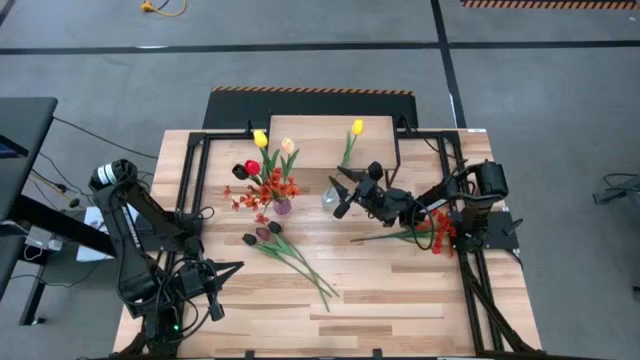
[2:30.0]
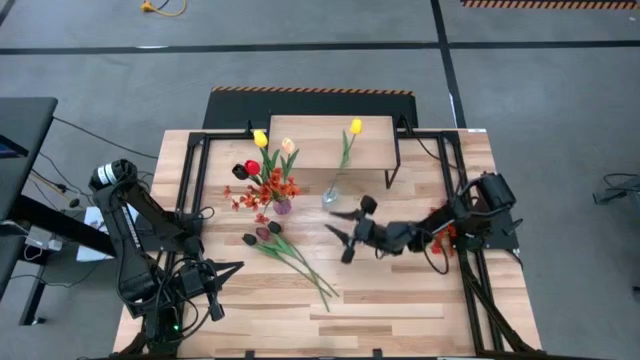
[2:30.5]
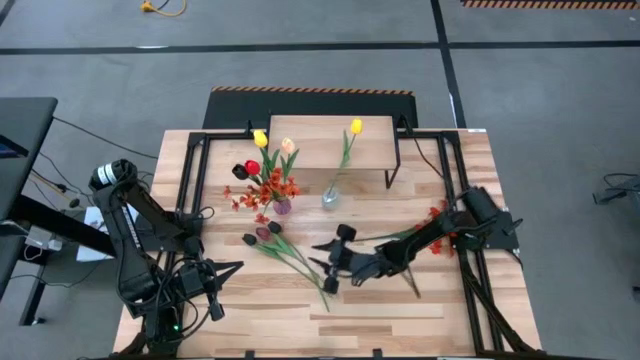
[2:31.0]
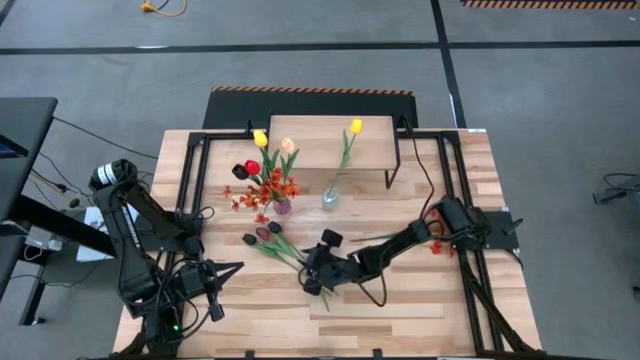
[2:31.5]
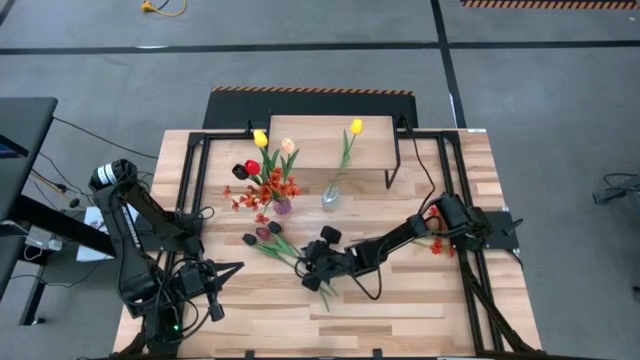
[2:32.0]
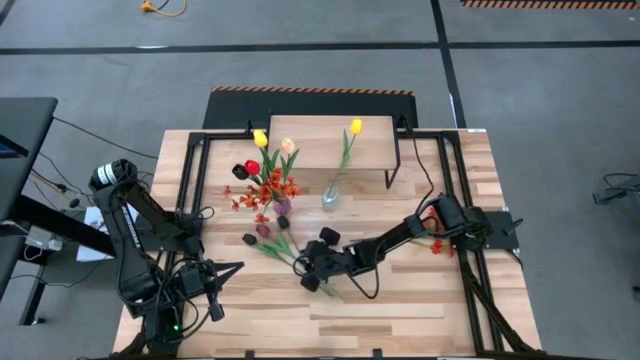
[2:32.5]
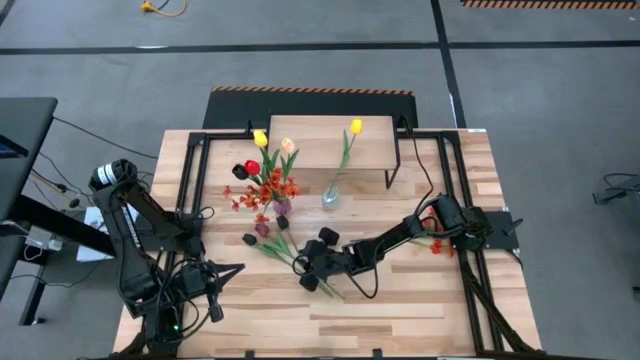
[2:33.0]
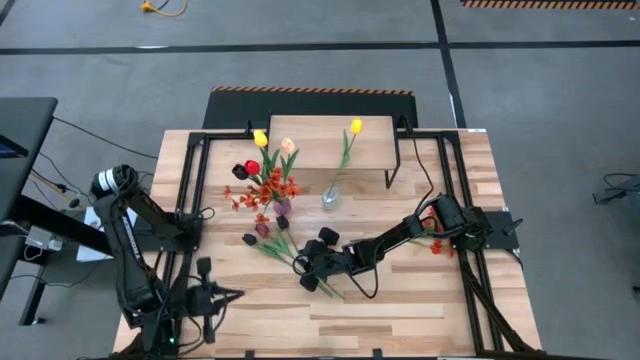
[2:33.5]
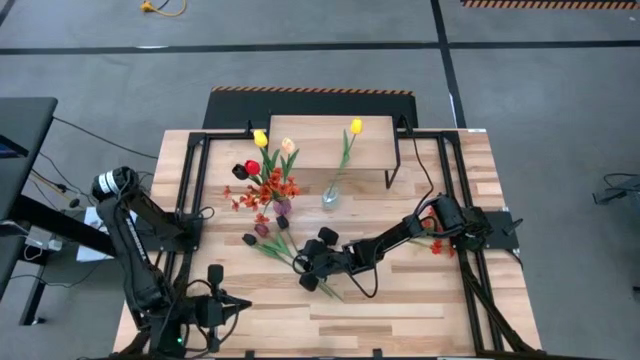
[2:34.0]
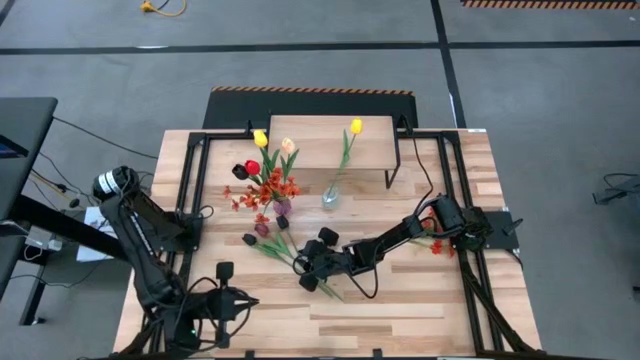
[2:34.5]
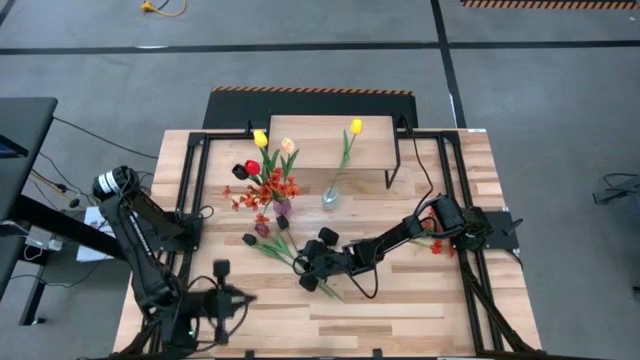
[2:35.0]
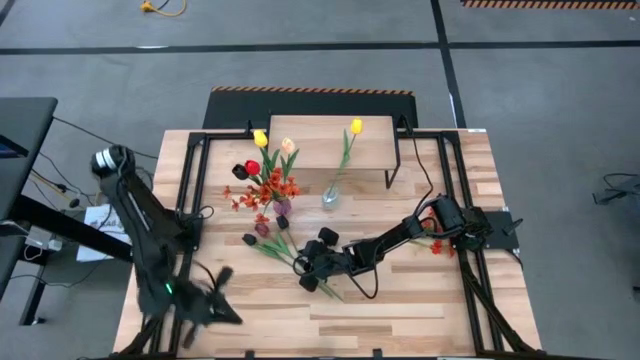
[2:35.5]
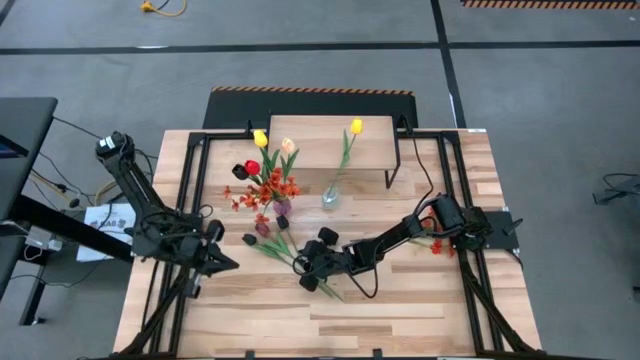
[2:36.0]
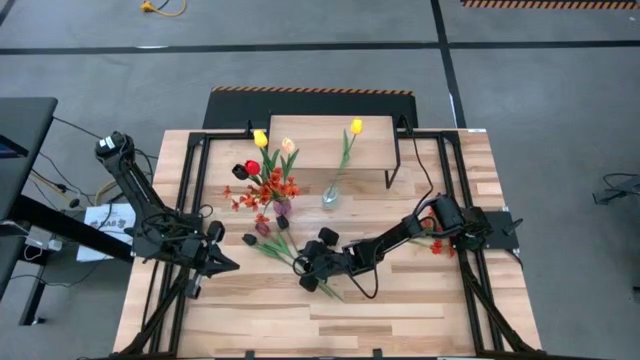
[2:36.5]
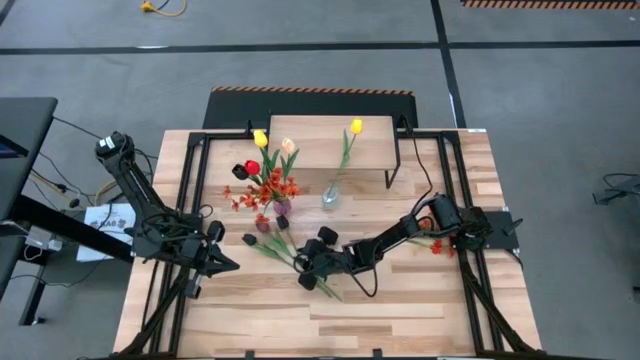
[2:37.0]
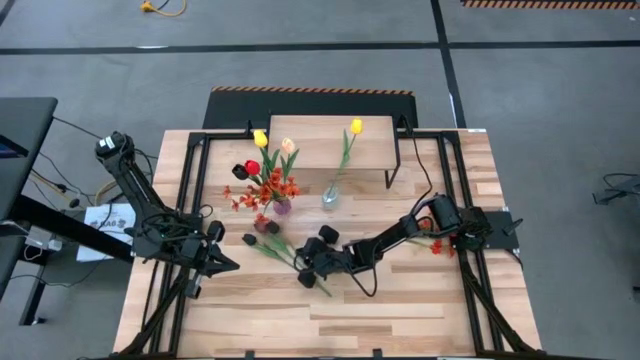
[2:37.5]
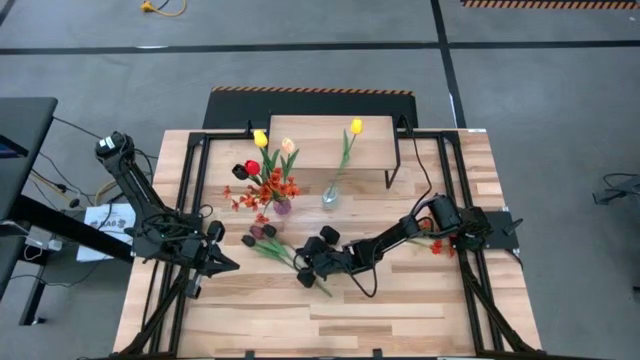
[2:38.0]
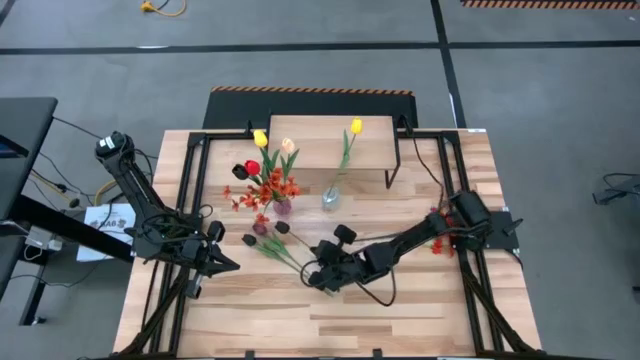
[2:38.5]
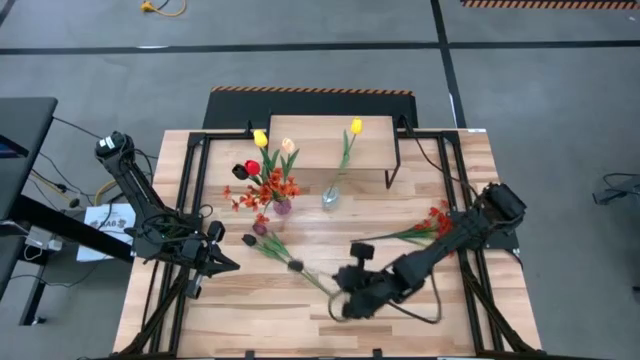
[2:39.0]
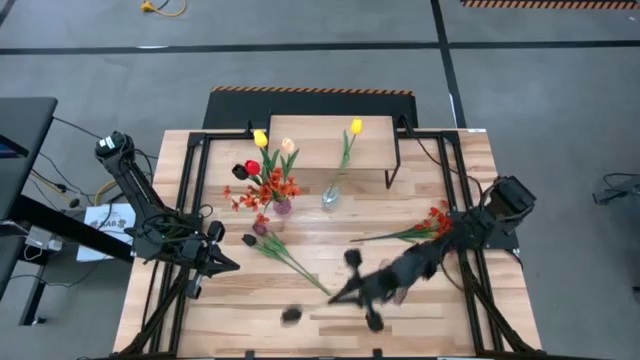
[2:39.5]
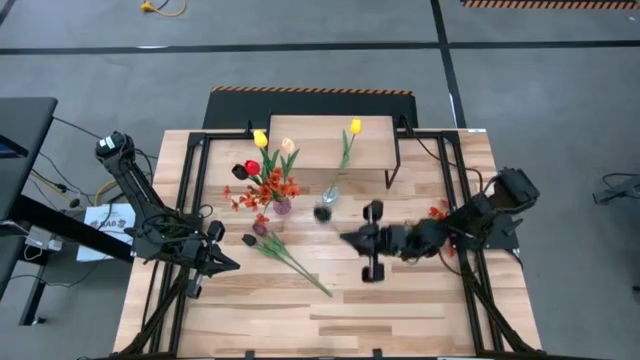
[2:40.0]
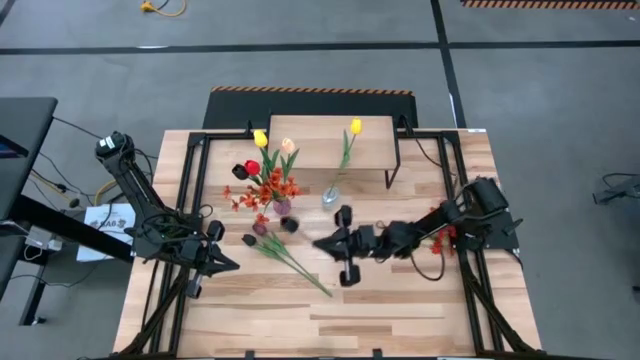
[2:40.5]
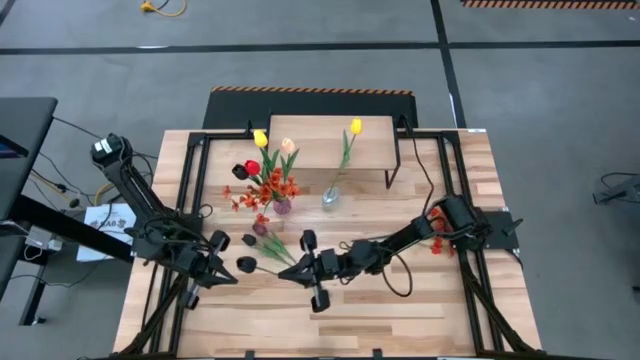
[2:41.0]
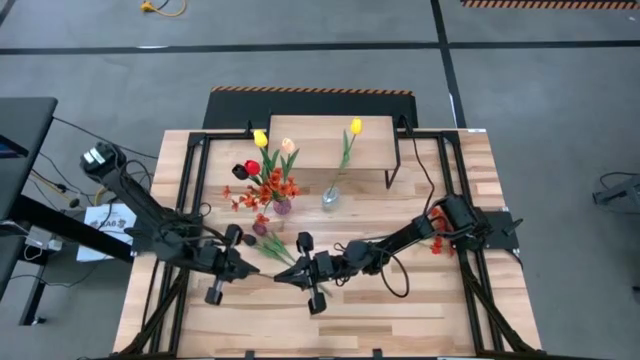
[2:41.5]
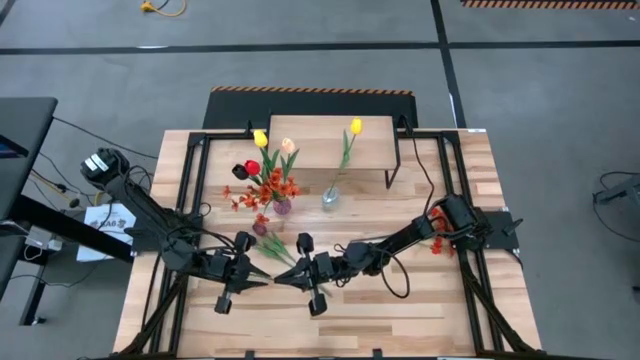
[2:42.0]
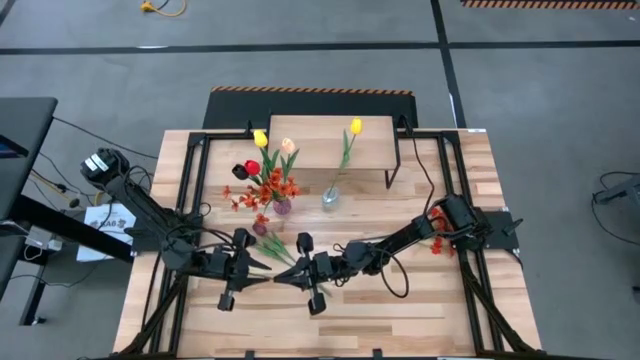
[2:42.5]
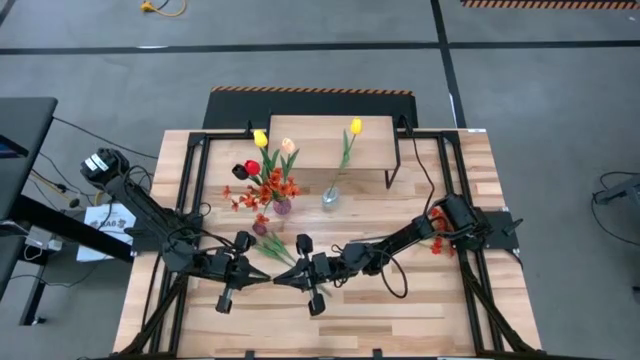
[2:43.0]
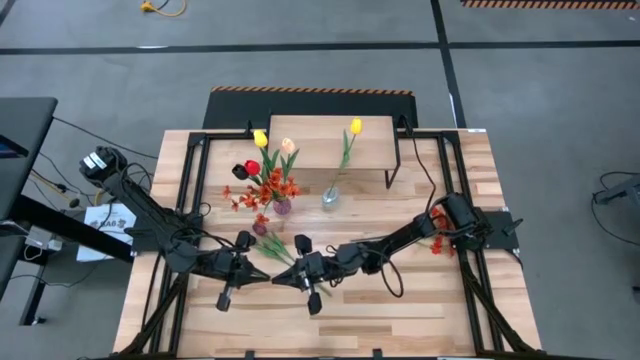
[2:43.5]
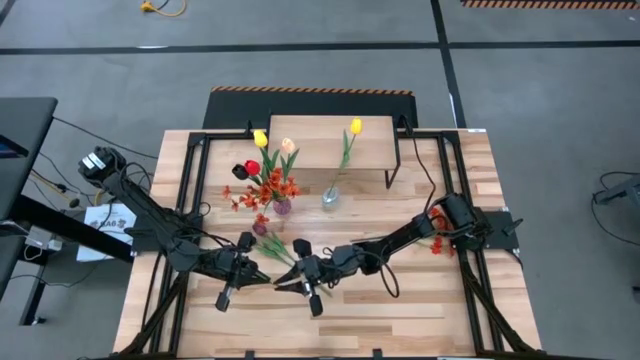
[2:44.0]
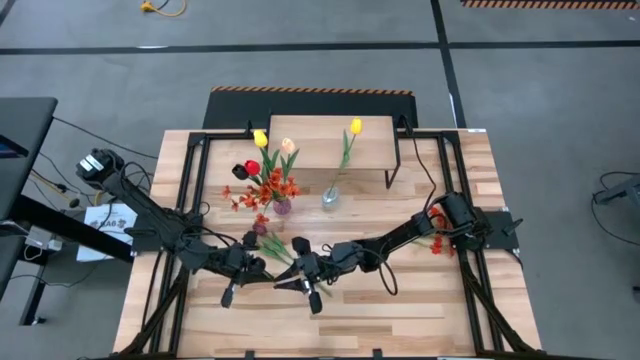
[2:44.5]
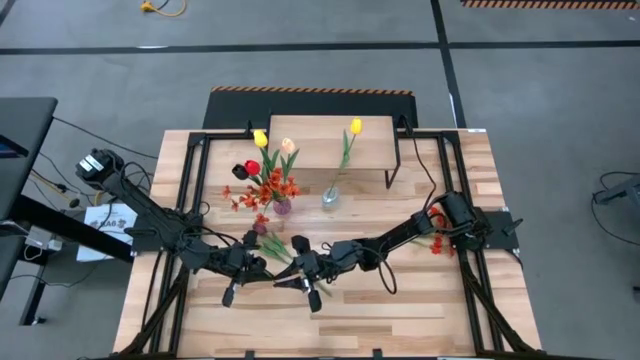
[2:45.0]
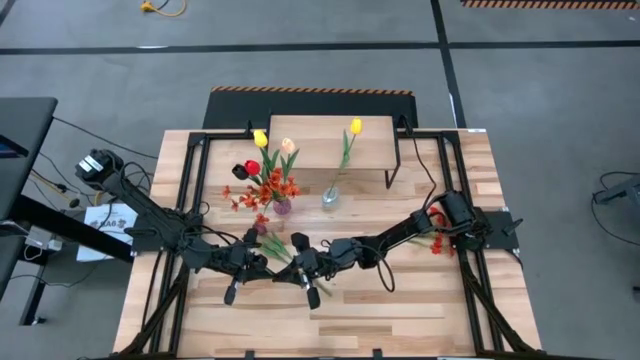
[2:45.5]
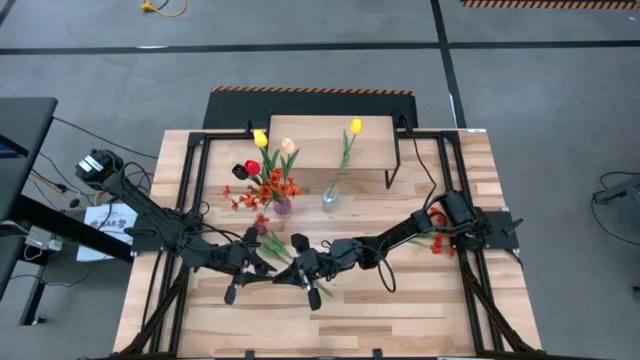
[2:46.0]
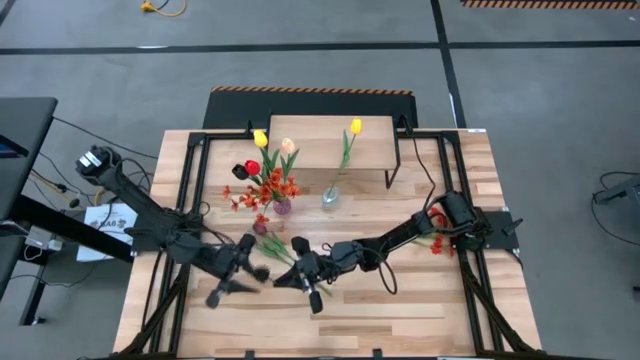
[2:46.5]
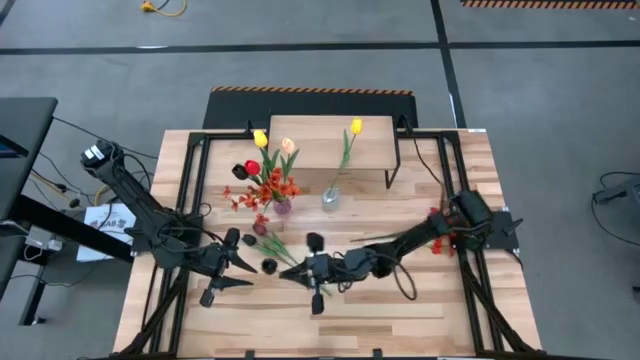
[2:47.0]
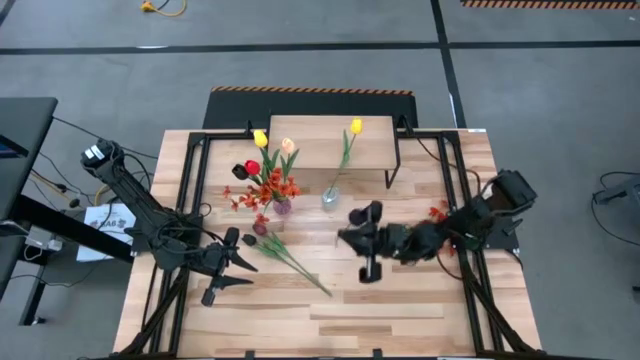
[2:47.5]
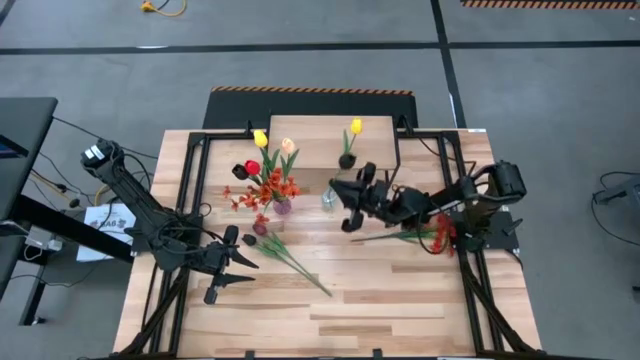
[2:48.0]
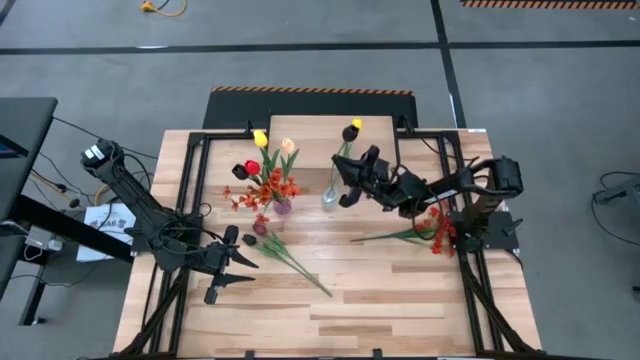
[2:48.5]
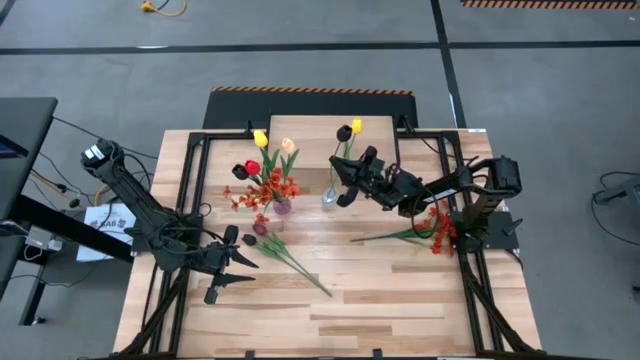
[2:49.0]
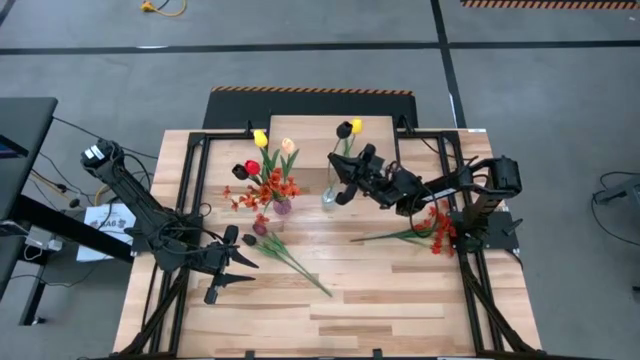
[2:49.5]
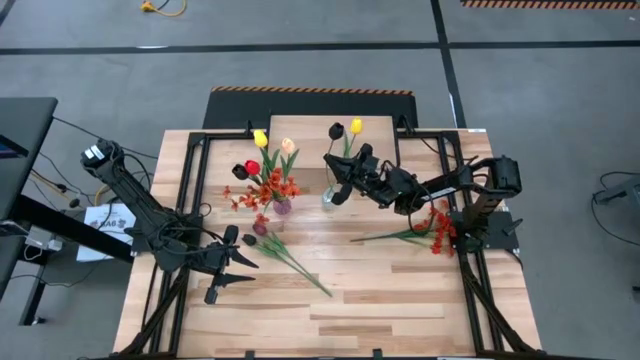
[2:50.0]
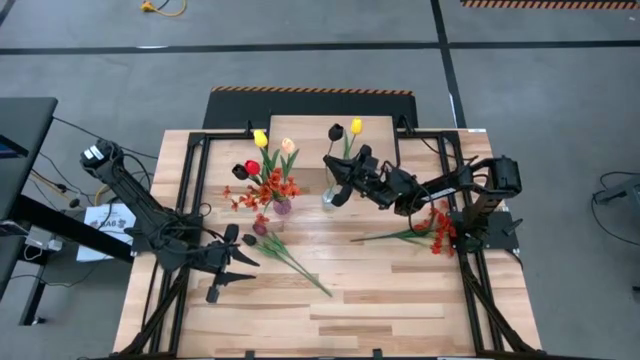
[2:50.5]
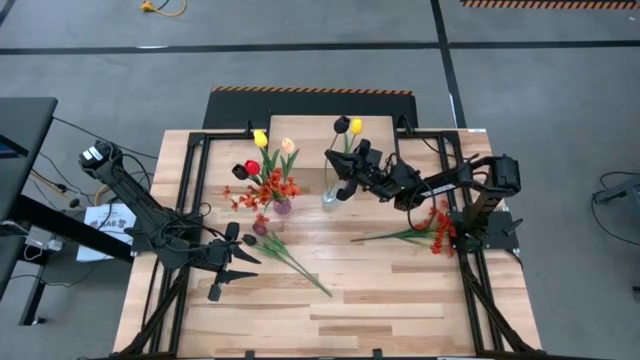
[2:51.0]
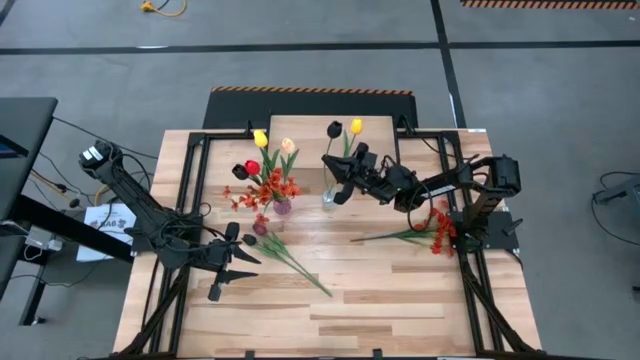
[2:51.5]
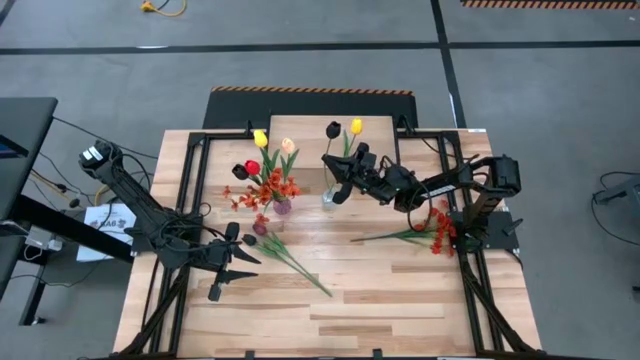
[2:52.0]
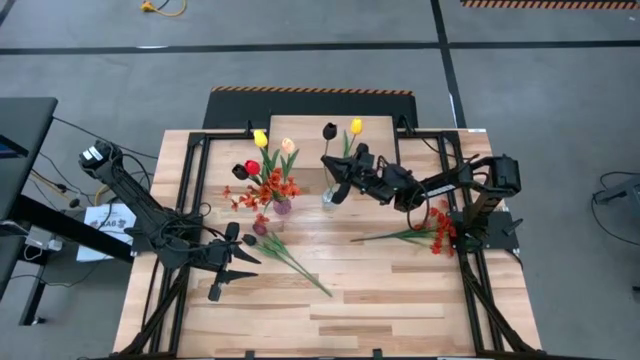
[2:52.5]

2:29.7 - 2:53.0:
Task: Pick and place flowers into a vace then onto a shelf
Put the right black tulip into the transparent vase
